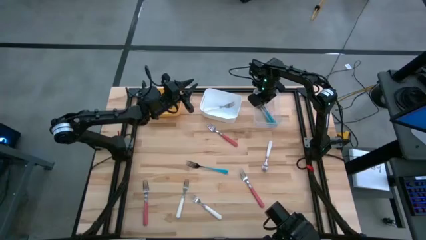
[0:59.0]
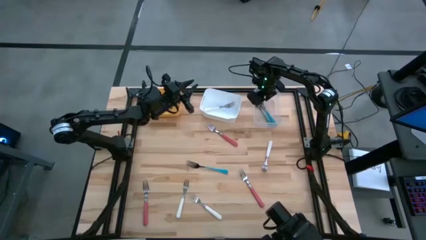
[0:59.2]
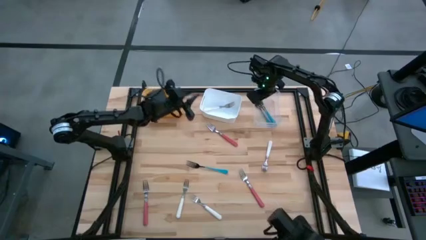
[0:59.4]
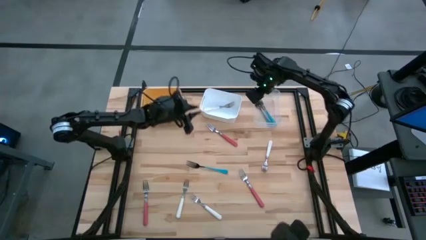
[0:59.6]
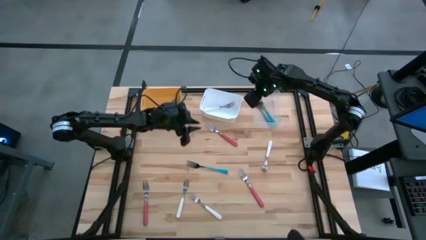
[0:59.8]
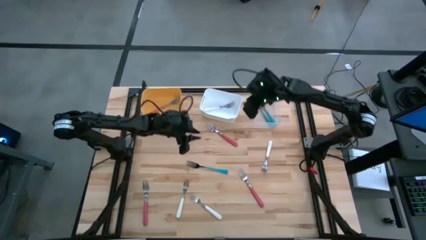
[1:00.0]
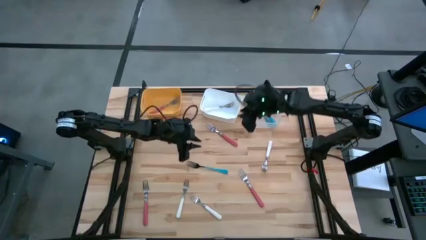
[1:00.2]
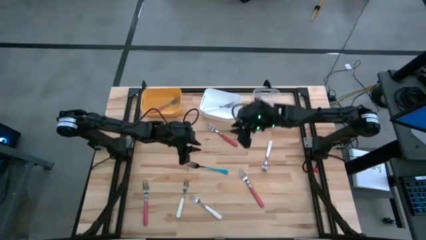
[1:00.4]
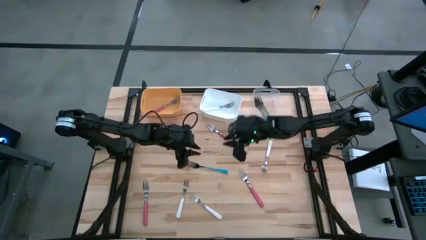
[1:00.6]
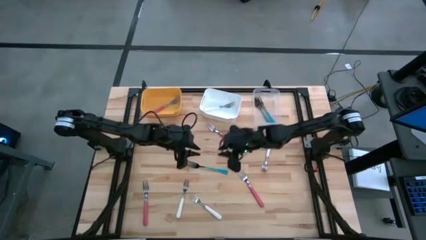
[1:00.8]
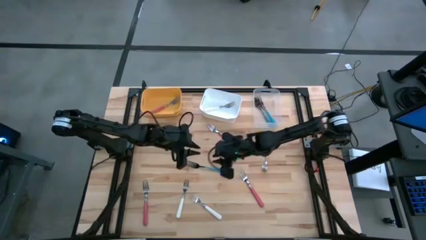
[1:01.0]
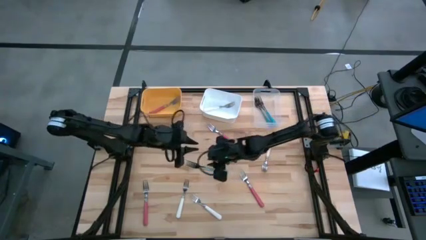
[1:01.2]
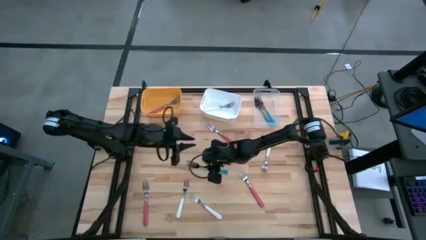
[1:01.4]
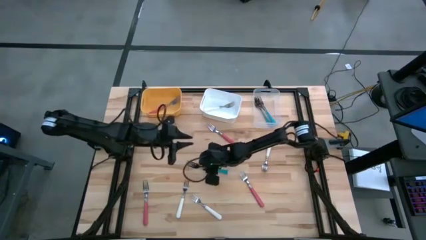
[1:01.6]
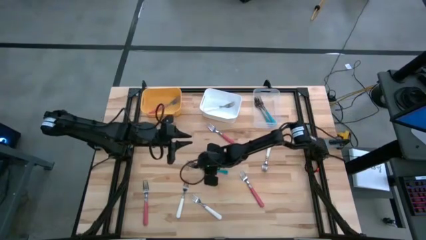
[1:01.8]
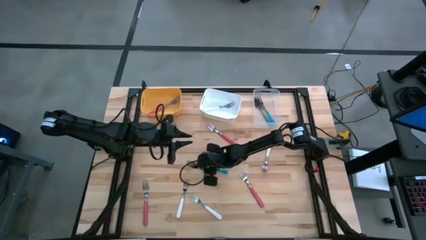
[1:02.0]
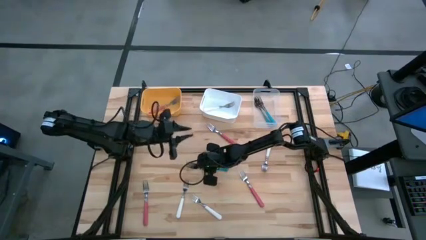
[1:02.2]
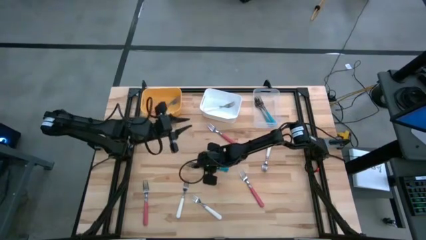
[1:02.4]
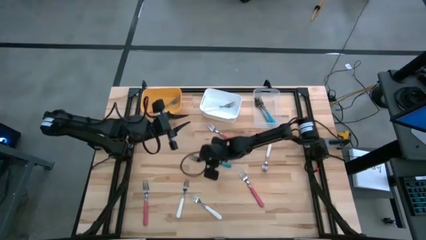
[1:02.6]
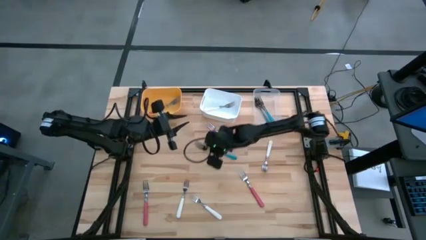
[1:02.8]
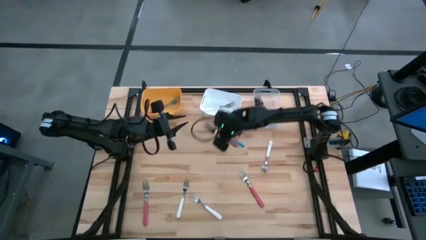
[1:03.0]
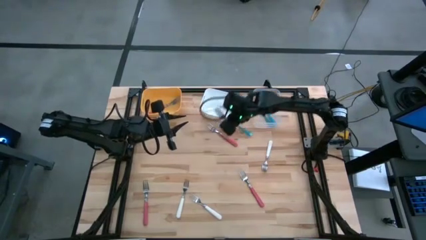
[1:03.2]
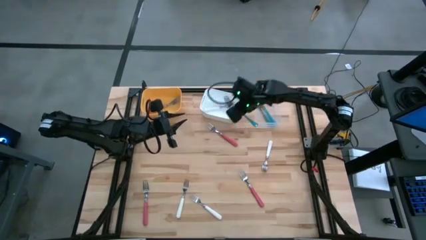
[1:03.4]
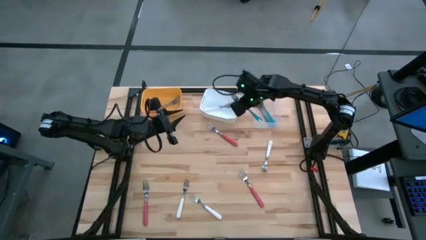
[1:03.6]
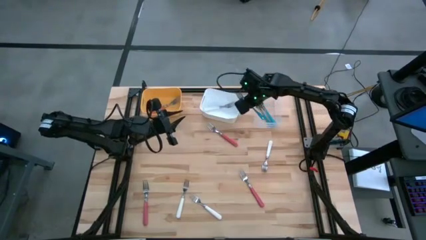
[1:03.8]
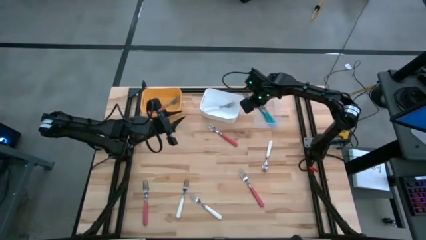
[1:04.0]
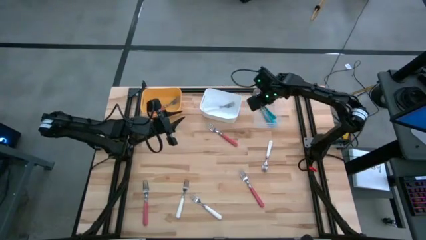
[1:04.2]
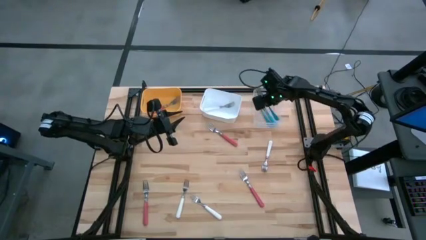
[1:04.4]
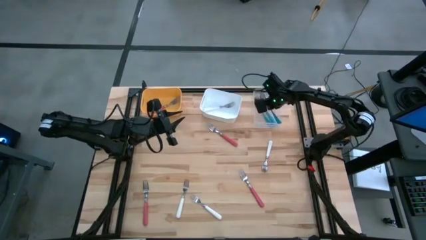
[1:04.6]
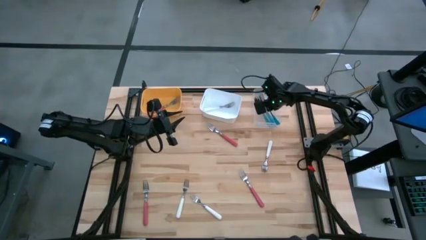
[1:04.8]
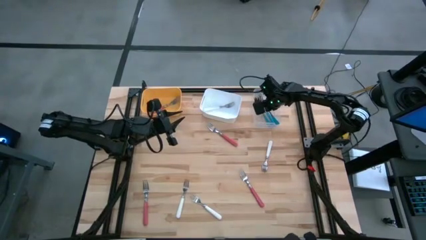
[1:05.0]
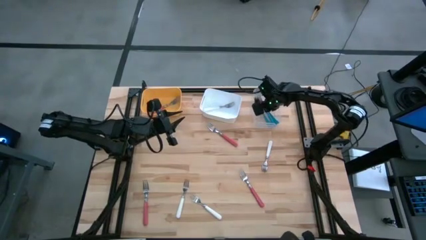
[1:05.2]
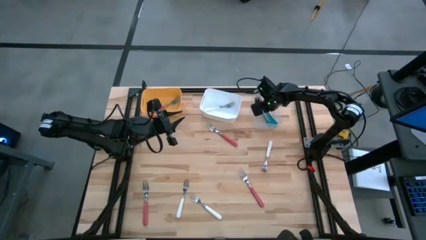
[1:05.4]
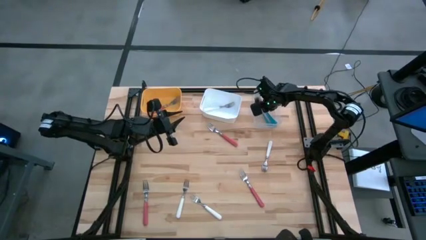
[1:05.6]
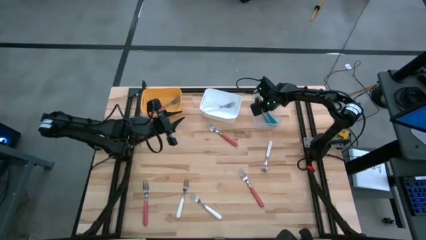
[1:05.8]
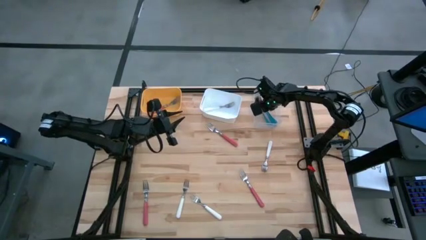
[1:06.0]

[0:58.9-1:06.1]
Task: Sort silverware by color (type)
Put the blue fork into the yellow bin

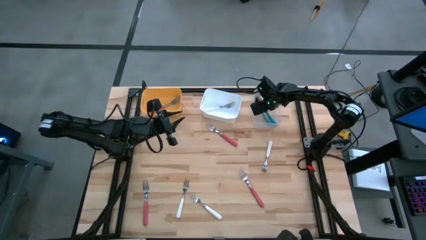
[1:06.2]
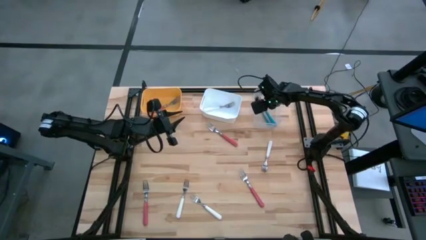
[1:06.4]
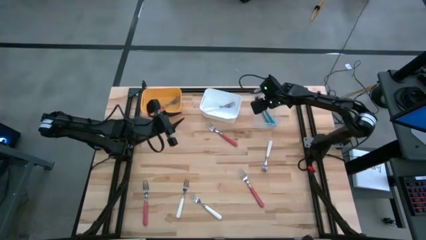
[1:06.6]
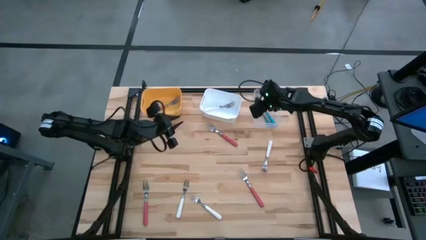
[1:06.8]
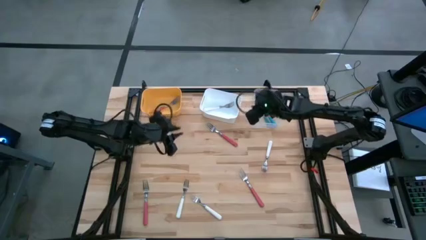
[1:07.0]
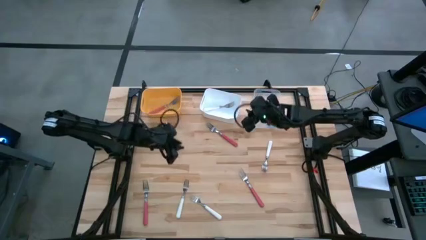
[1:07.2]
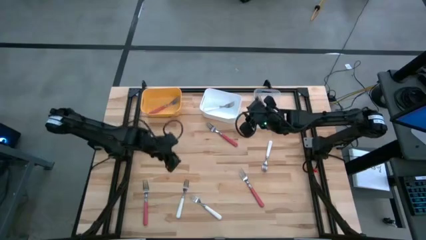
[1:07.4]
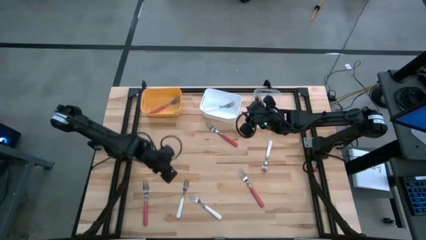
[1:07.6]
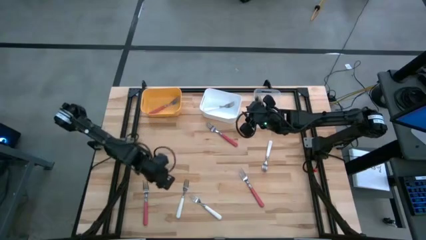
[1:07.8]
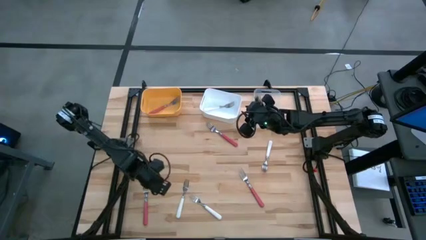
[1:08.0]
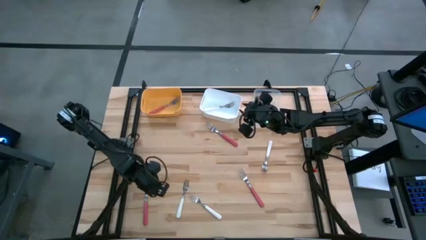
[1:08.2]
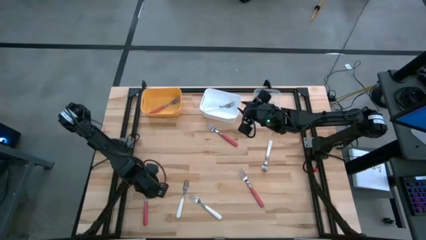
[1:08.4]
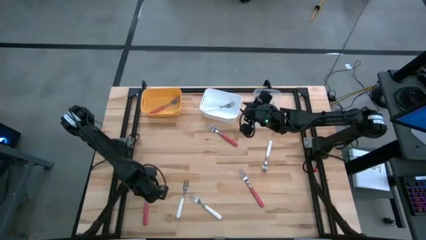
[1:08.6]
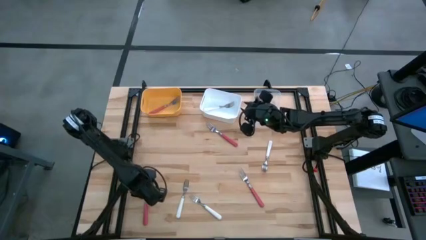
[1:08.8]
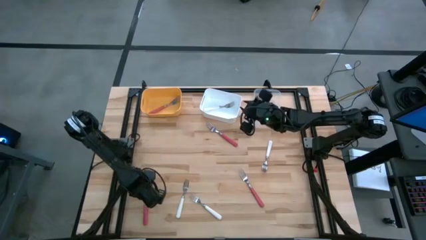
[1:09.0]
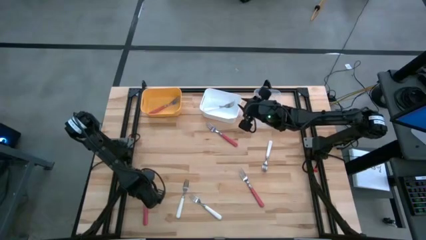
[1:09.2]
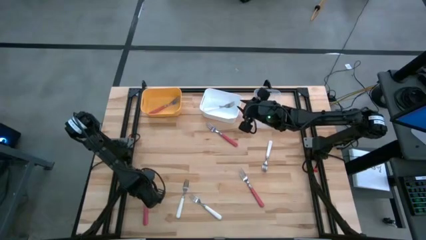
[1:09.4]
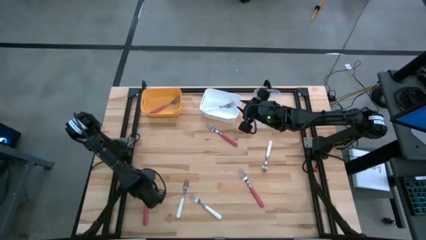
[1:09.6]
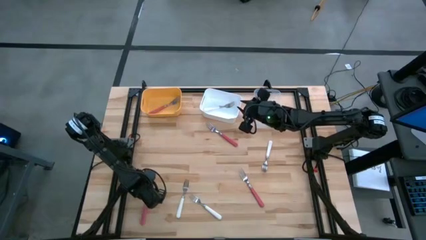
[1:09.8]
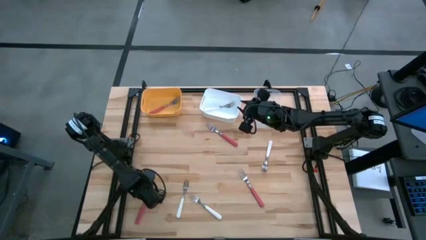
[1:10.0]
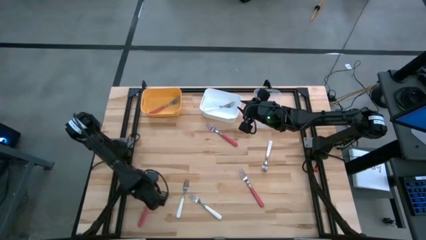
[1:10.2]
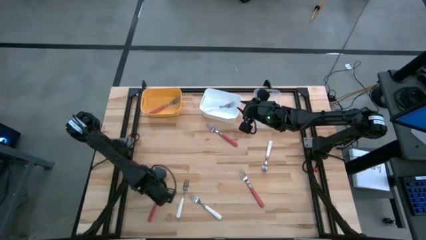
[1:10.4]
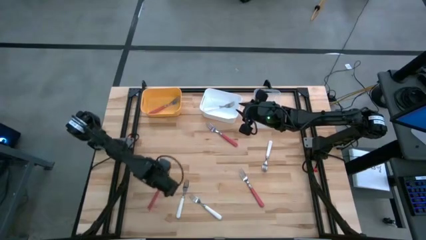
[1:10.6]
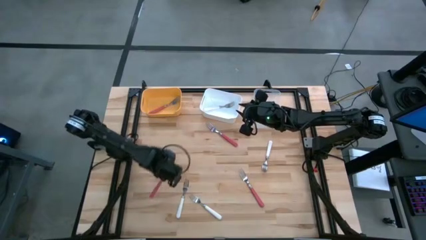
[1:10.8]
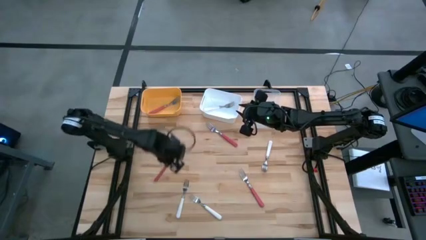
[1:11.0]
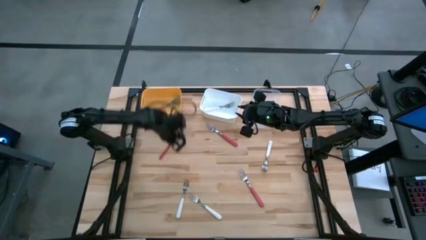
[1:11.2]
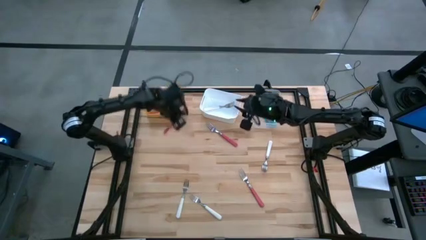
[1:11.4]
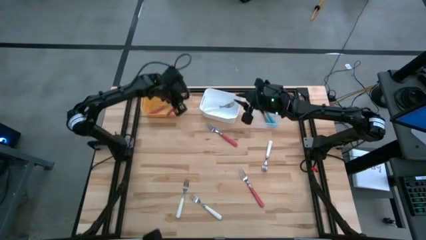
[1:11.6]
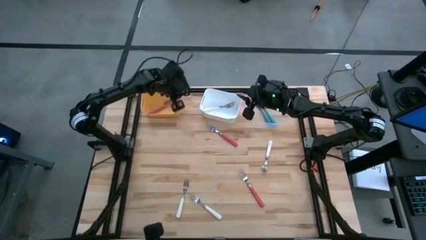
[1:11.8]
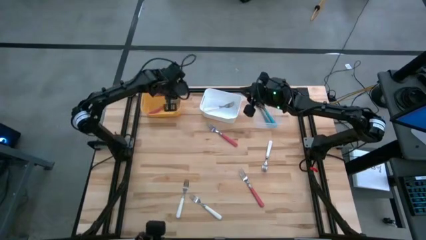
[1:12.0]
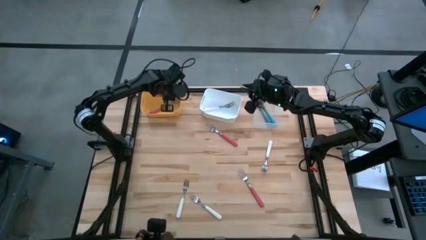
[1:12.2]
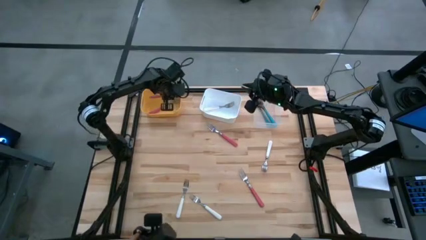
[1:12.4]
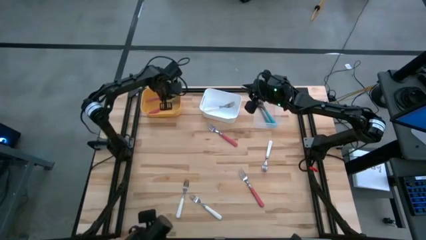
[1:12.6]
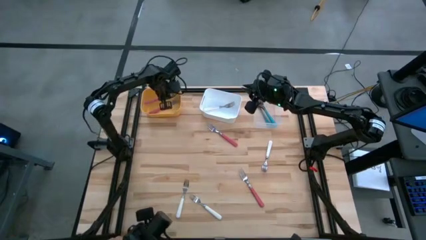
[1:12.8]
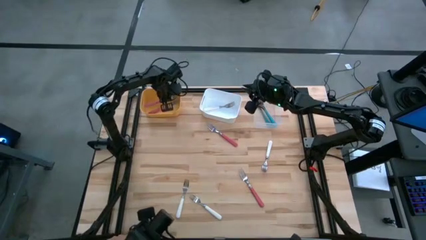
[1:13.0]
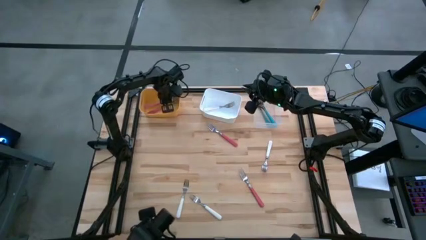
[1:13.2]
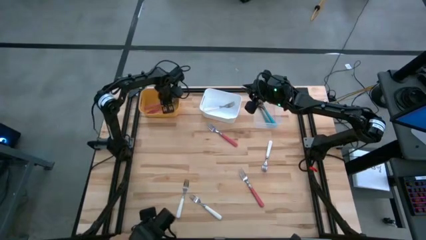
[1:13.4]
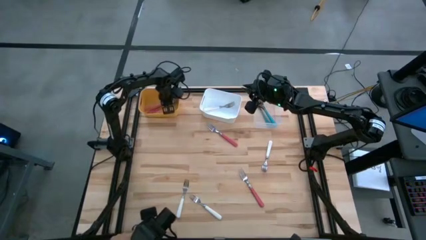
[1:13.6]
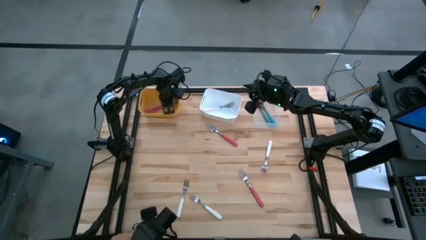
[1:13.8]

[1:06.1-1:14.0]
Put the pink fork into the yellow bin

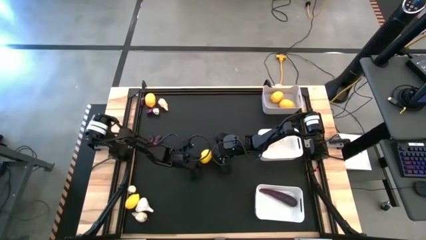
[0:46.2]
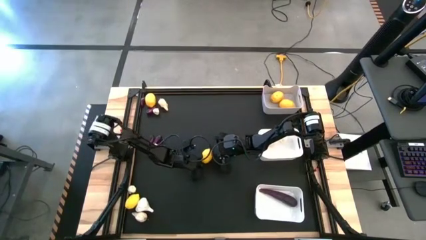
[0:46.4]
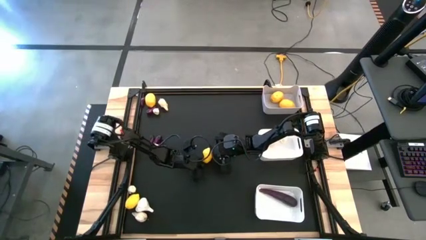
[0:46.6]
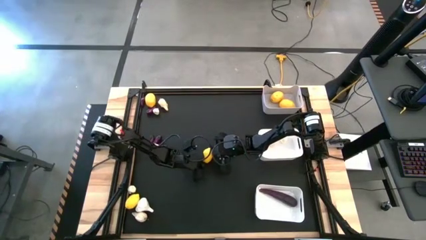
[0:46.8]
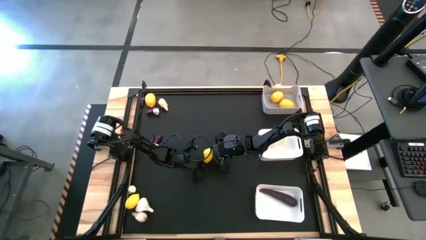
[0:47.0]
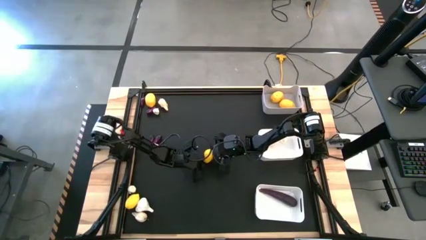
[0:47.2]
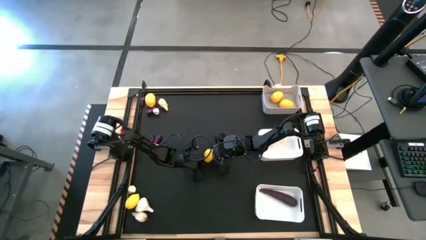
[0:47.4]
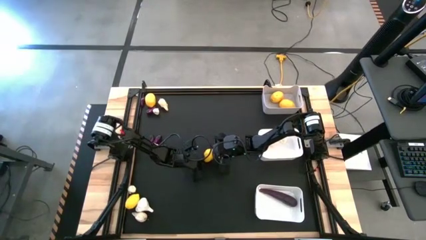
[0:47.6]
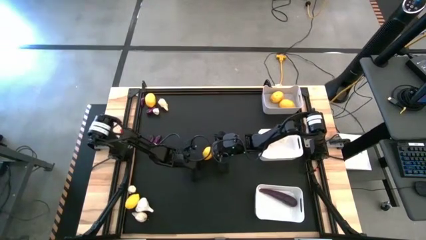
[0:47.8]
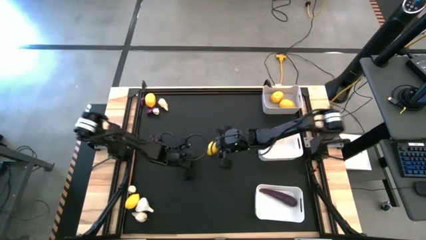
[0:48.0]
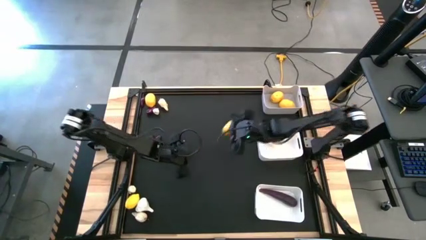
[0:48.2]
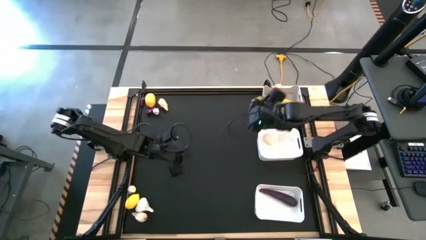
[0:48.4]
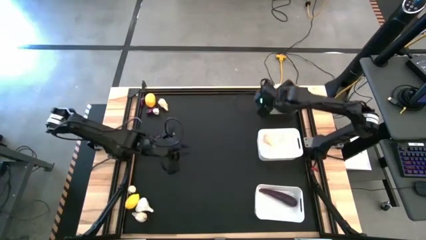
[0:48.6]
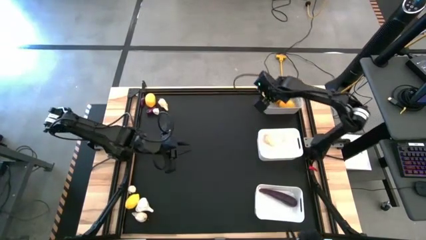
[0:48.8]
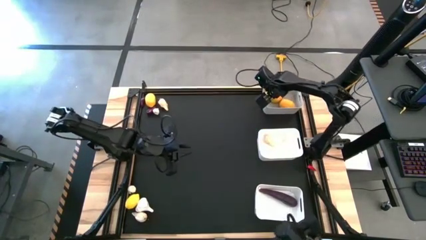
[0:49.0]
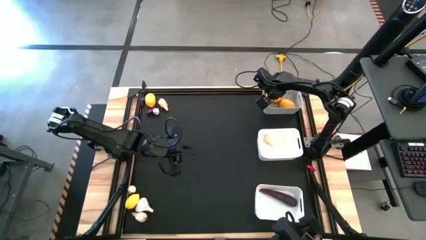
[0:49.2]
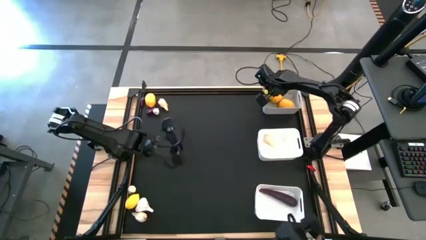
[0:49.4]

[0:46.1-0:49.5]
Task: Sort produce into baskets
Put the lemon into the gray bin
